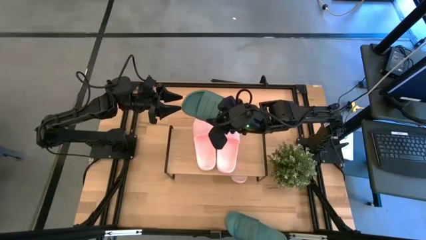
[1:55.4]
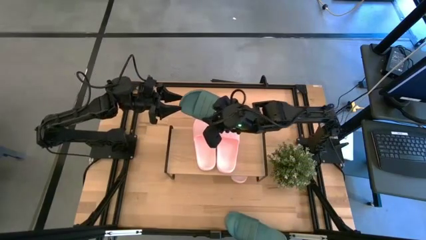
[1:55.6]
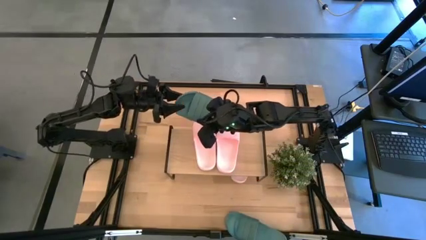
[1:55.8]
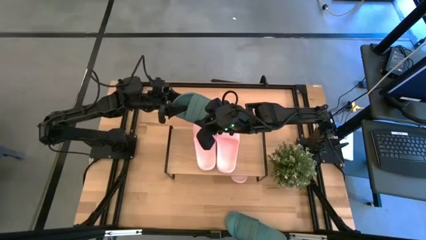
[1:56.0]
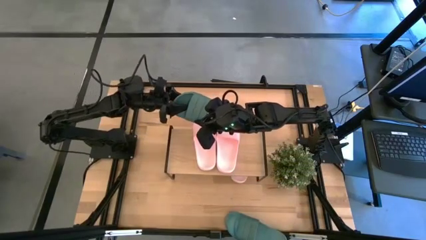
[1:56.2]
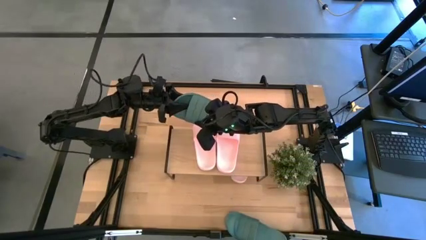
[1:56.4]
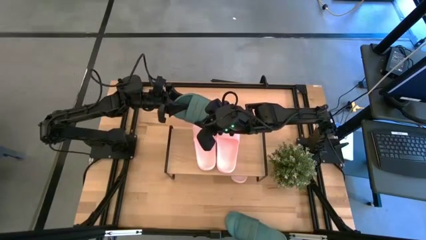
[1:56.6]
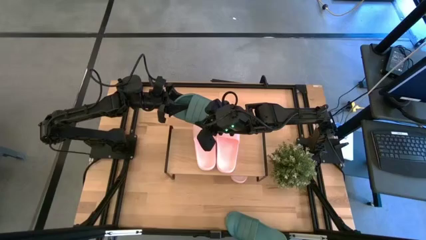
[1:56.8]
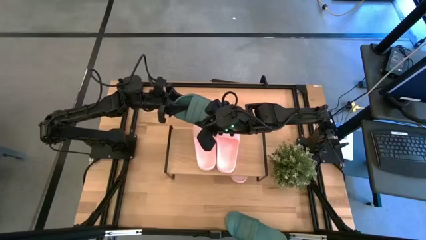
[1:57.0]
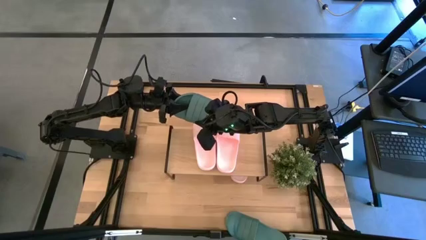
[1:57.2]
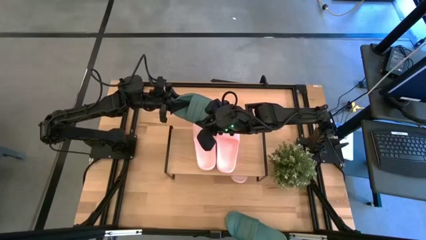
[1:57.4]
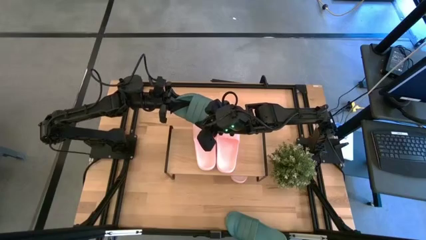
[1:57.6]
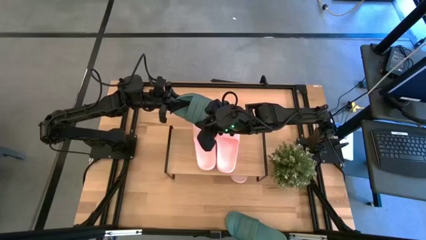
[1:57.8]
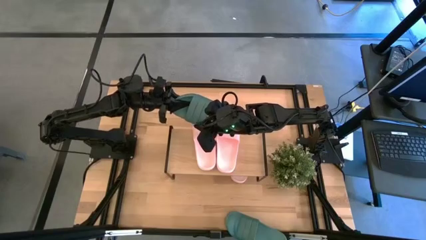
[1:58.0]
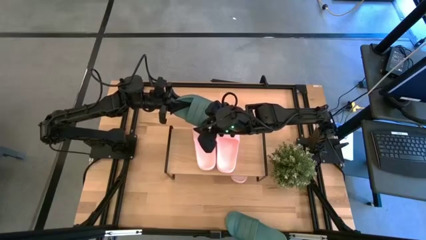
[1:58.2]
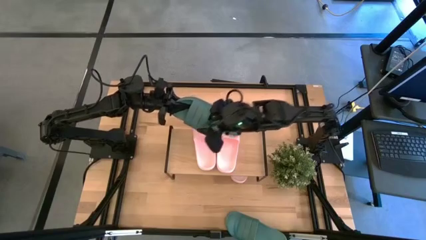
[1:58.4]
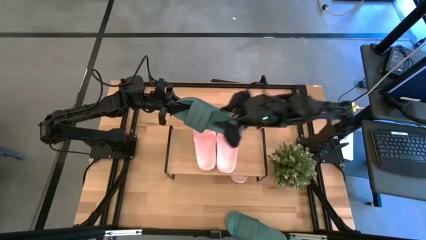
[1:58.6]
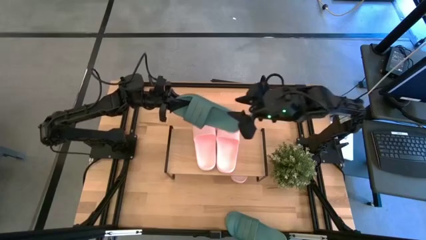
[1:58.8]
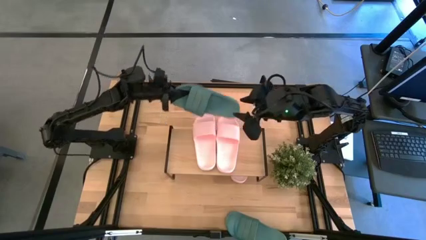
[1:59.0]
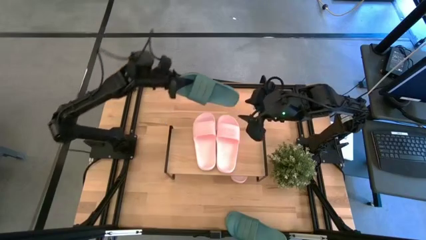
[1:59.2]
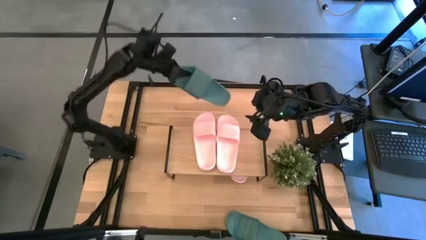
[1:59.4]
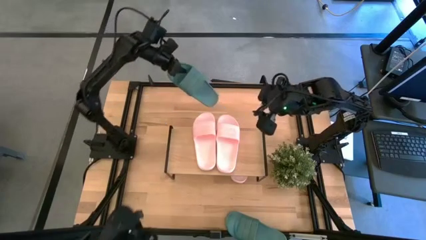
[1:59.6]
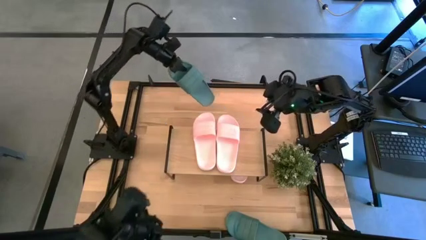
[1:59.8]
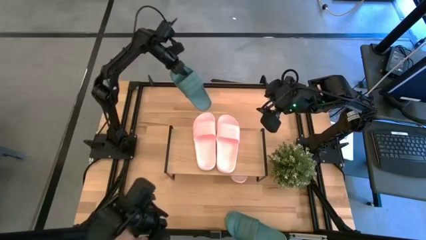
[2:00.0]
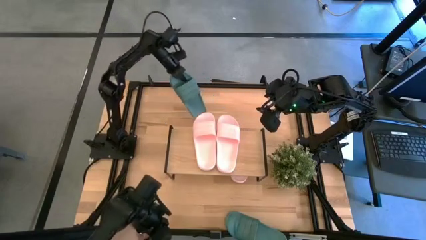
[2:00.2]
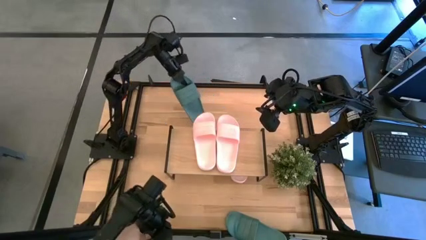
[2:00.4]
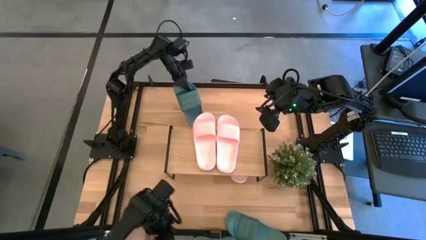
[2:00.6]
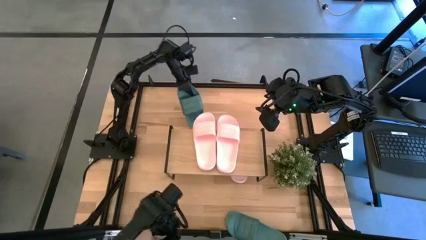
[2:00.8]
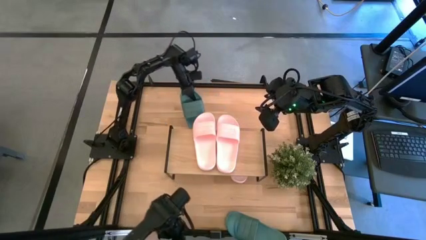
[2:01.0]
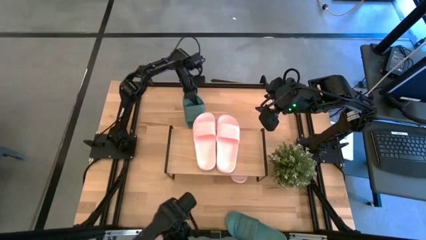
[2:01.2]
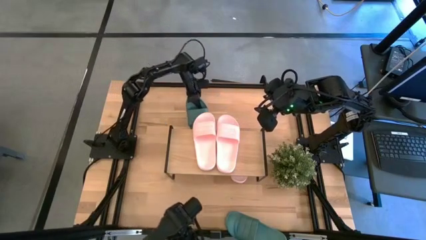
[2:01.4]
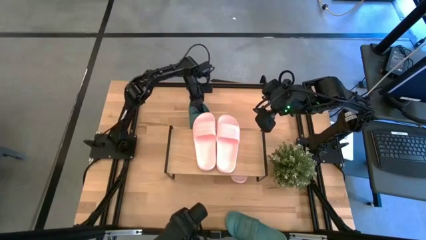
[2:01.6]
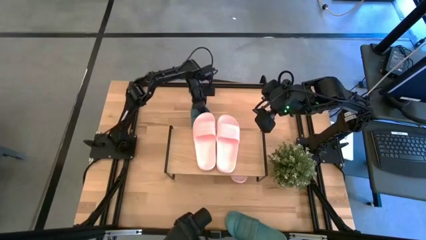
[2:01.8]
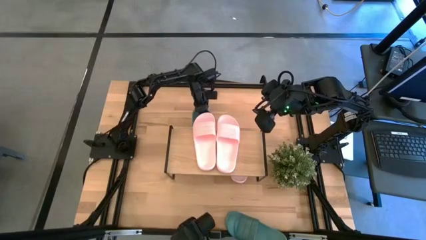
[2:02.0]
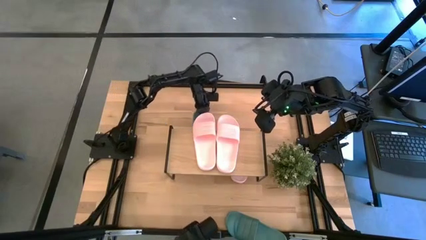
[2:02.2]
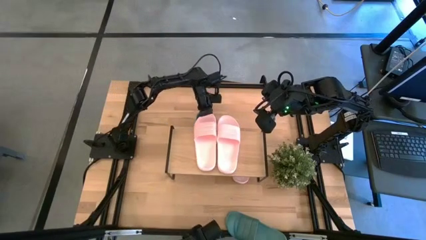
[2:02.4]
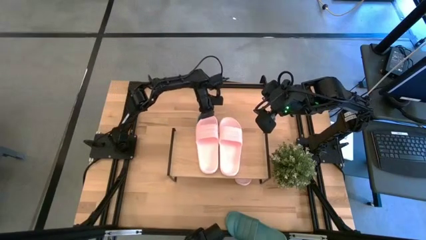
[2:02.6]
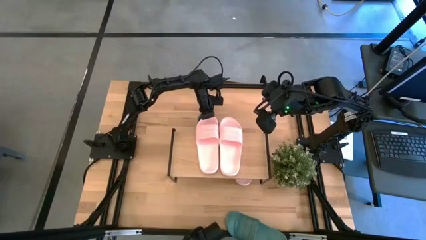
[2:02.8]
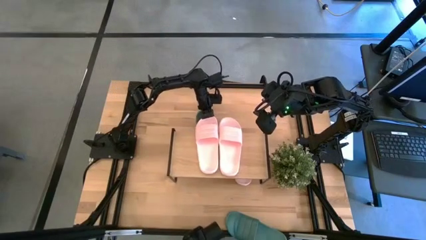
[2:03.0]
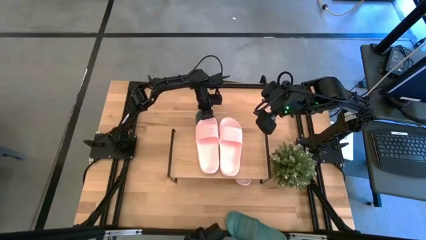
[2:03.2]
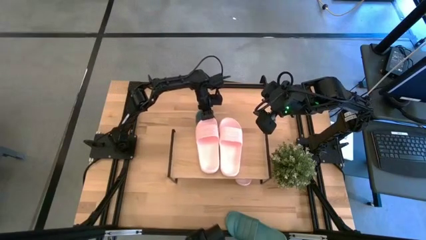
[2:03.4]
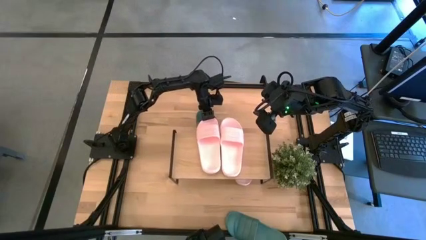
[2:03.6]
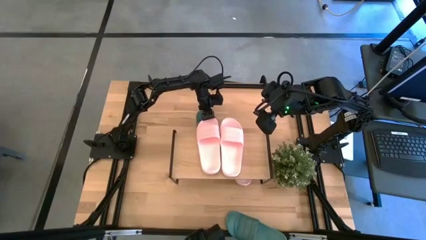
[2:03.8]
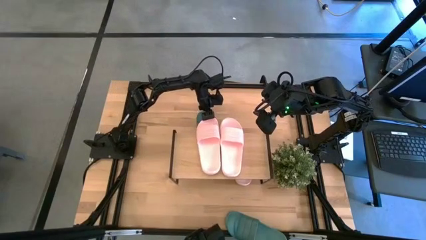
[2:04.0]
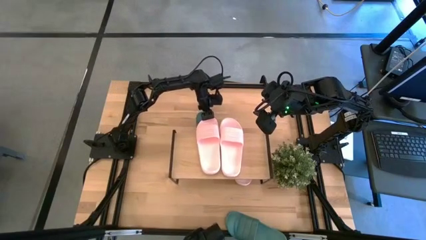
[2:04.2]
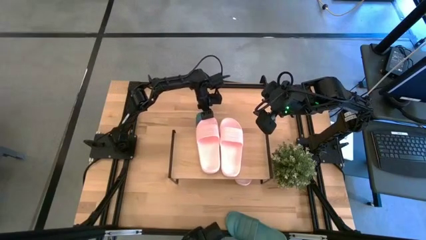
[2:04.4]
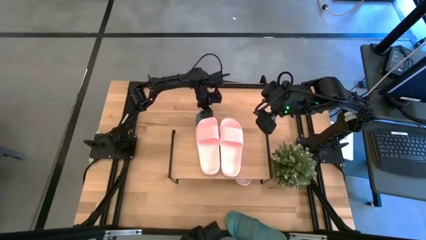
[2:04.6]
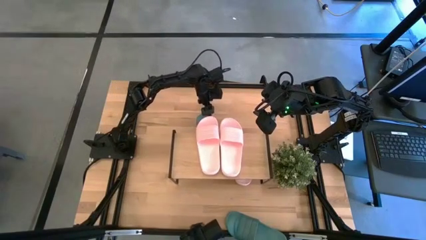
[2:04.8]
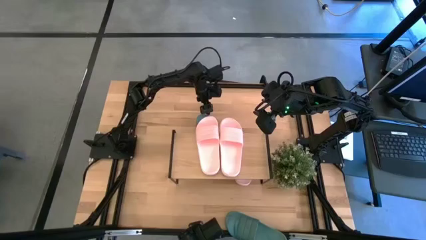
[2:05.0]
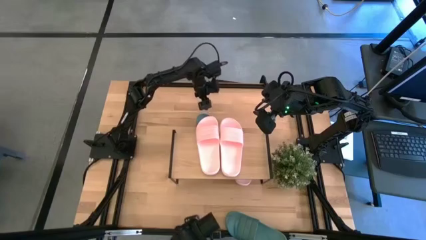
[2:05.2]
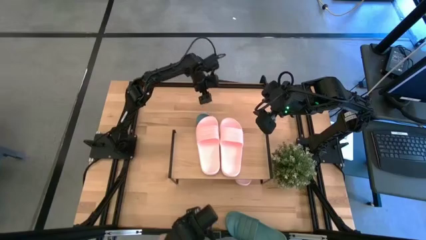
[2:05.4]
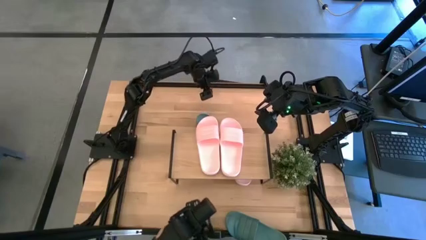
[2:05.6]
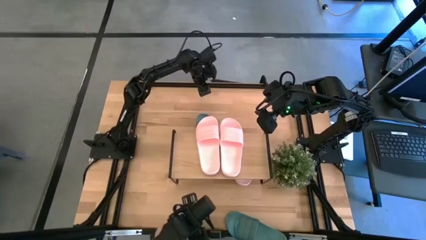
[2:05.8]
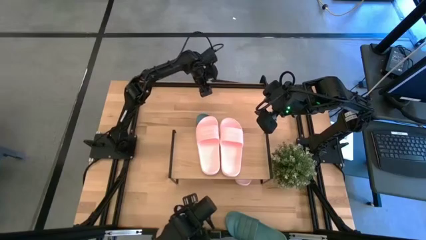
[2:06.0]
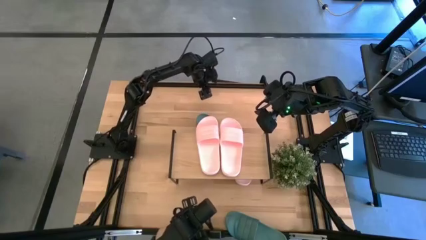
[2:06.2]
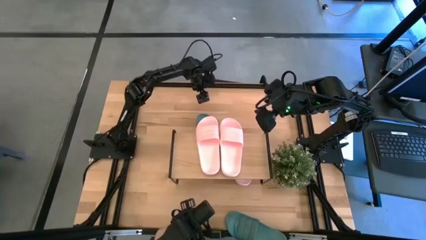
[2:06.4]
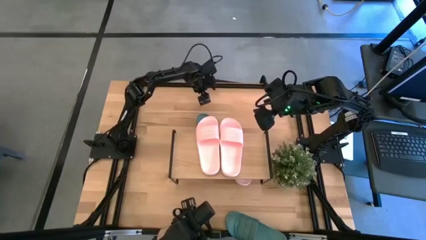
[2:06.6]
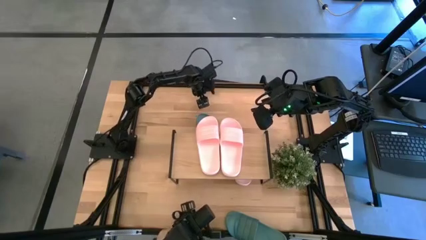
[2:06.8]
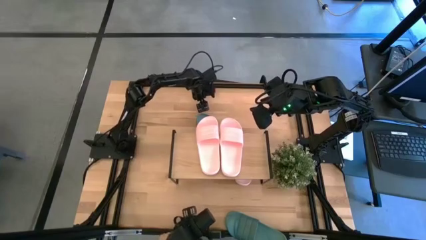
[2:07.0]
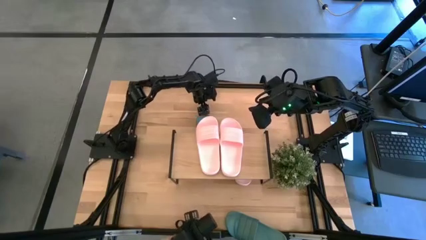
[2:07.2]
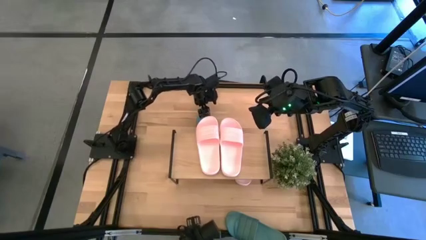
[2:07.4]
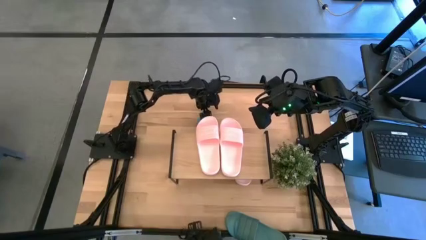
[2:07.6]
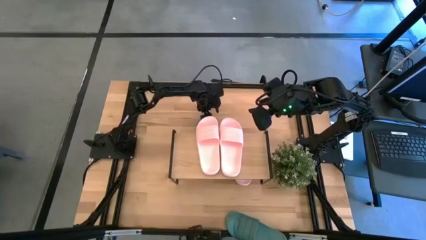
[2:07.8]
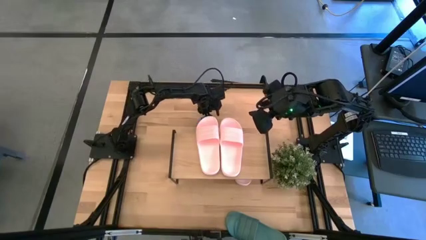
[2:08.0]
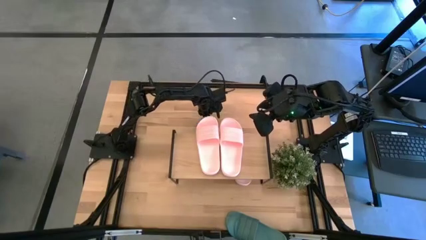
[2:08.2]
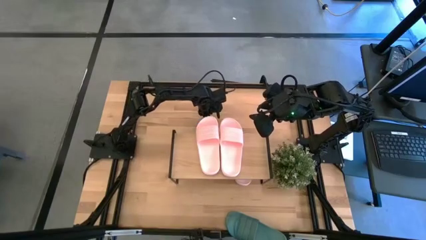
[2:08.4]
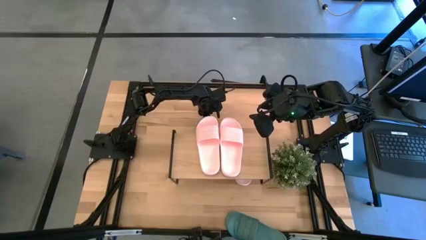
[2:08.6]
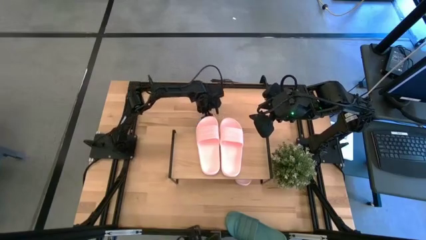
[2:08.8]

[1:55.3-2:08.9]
Task: Pick and place slides into the shelf
Put the green slipper under the shelf

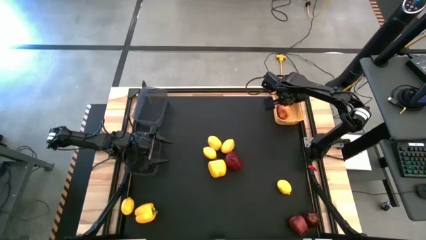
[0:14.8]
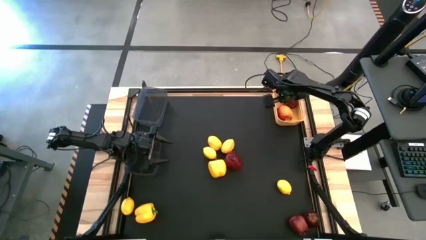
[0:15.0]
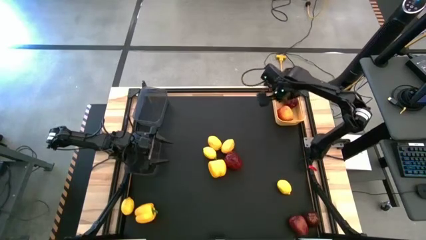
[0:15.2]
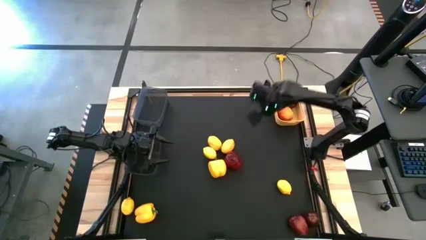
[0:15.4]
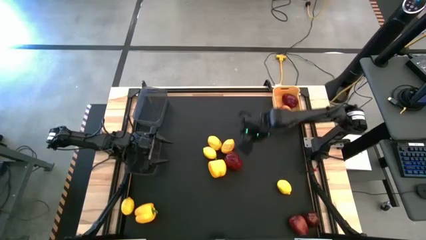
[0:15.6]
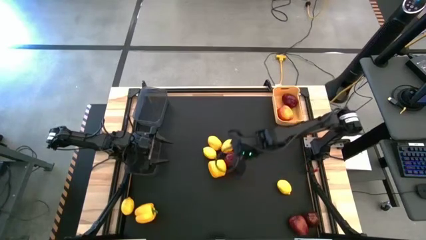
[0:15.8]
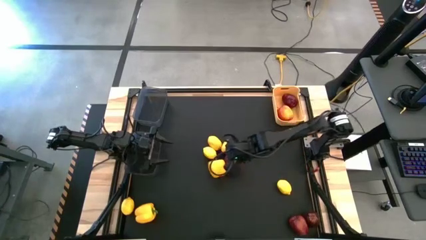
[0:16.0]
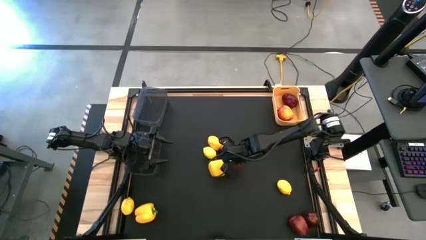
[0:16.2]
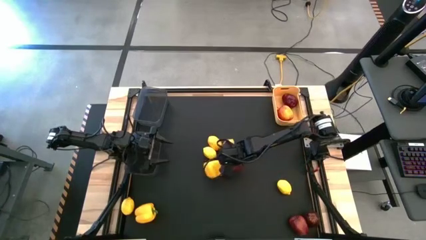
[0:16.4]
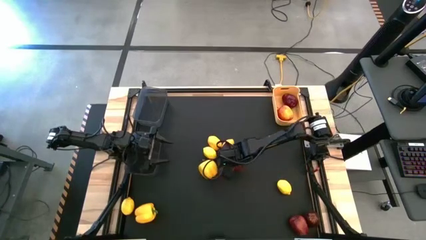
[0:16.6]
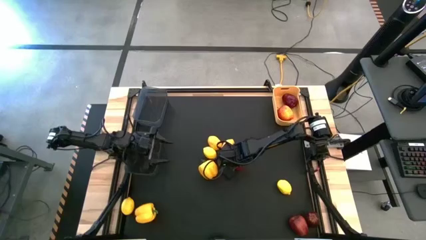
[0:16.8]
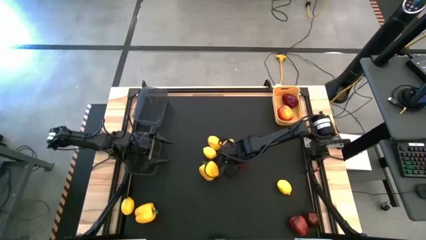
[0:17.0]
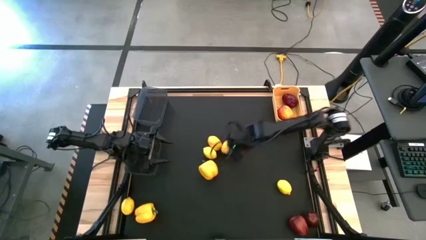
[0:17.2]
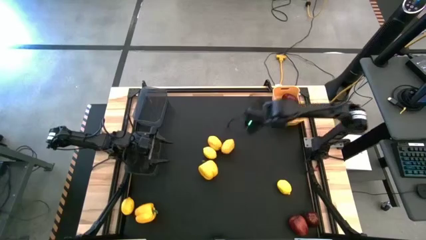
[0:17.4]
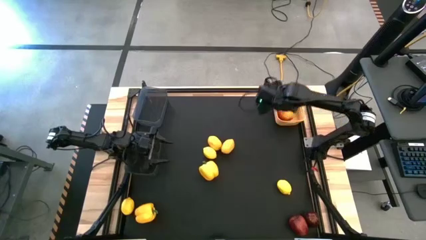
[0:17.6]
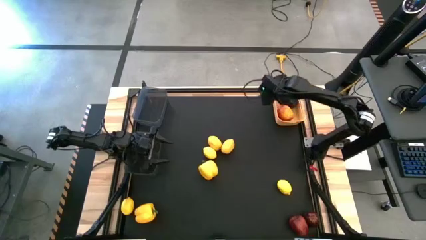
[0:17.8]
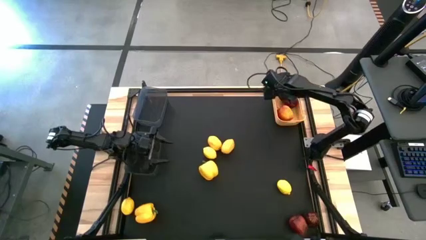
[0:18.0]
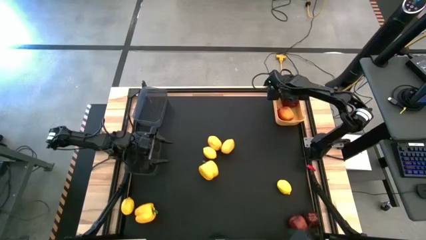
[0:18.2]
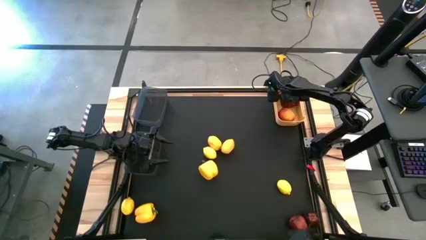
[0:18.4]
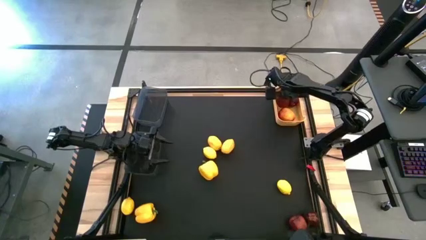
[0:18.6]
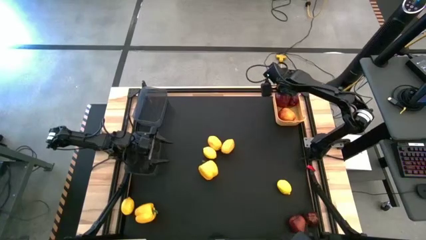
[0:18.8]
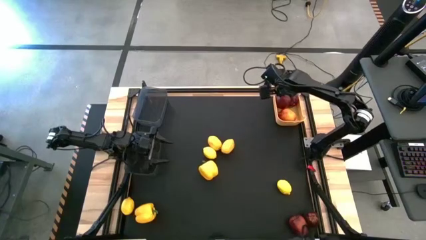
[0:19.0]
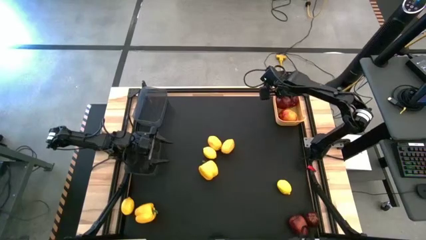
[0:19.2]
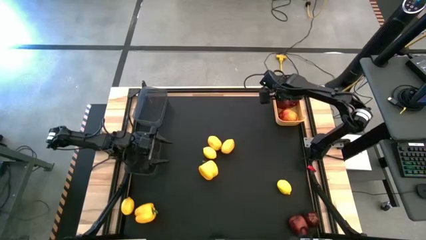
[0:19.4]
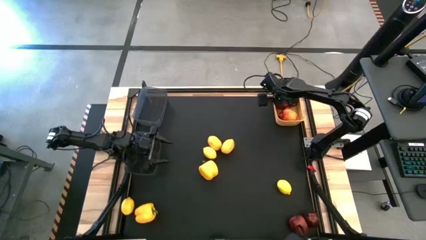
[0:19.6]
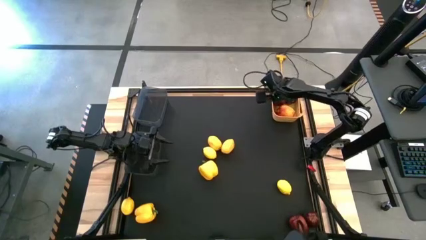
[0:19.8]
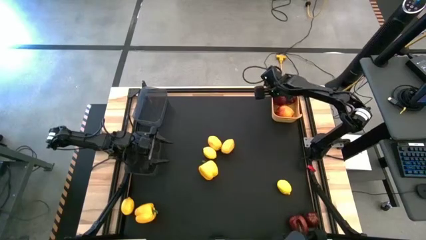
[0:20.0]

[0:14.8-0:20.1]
Task: Sort produce into baskets
Put the apple into the yellow bin
